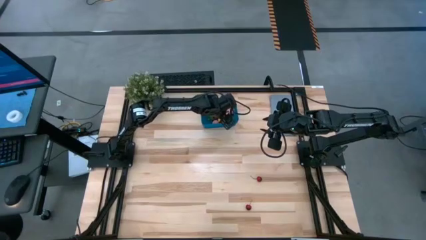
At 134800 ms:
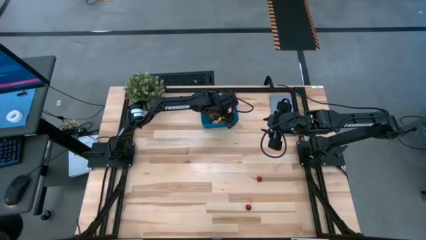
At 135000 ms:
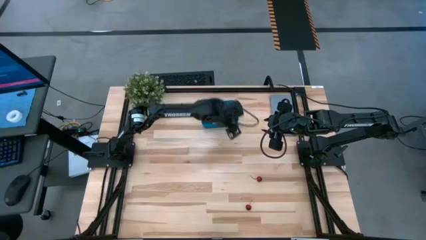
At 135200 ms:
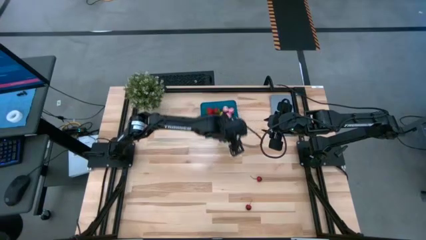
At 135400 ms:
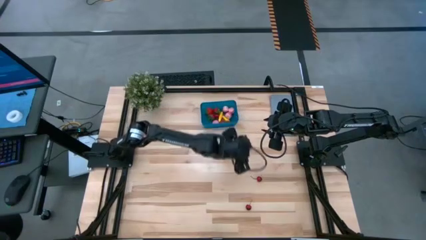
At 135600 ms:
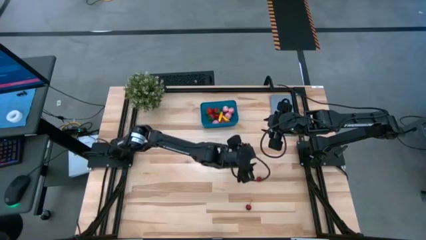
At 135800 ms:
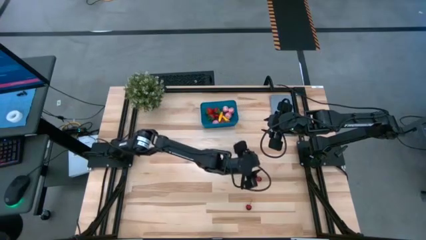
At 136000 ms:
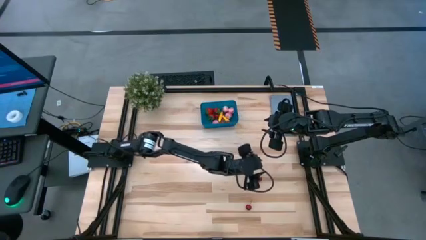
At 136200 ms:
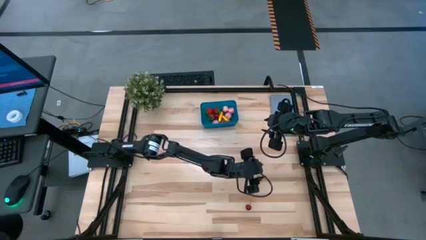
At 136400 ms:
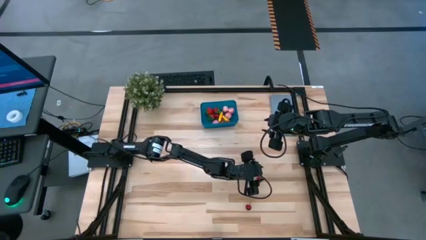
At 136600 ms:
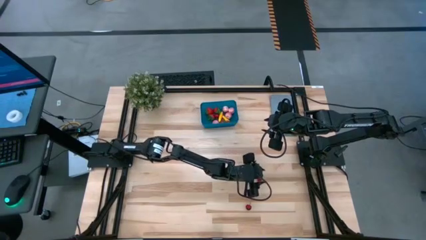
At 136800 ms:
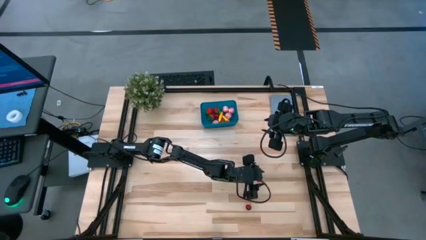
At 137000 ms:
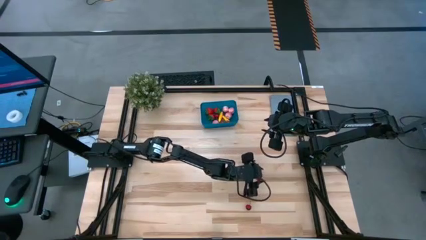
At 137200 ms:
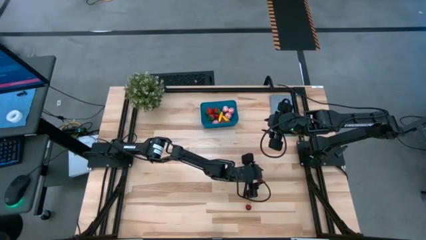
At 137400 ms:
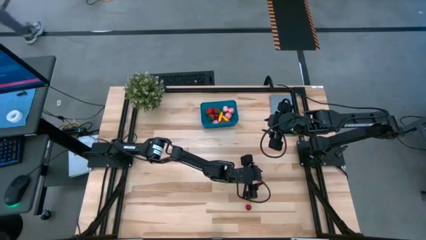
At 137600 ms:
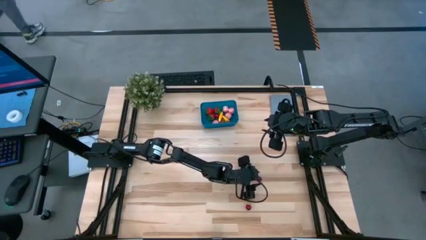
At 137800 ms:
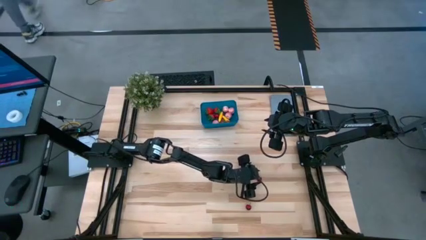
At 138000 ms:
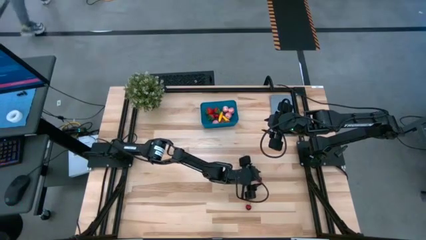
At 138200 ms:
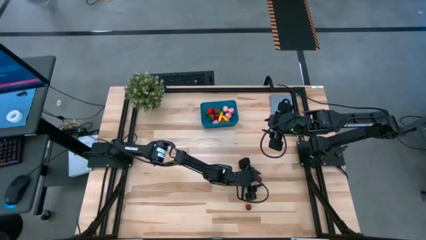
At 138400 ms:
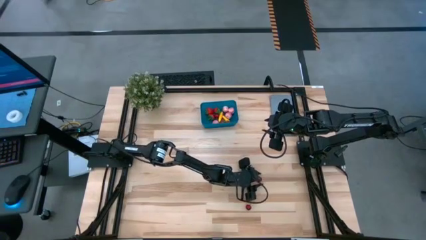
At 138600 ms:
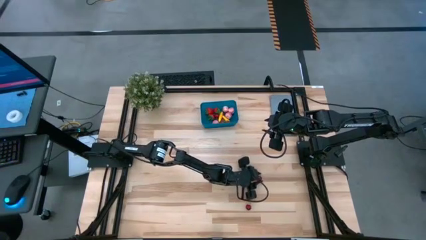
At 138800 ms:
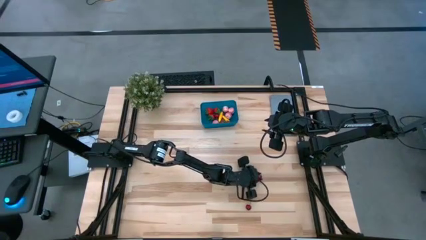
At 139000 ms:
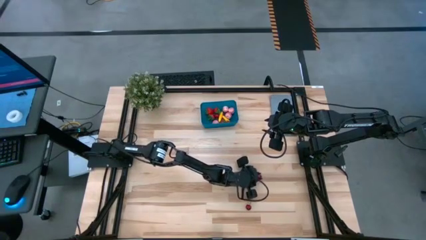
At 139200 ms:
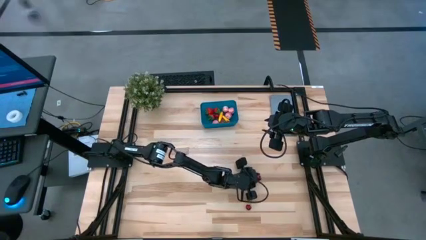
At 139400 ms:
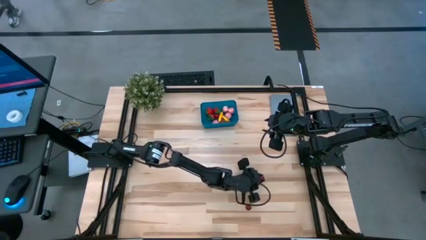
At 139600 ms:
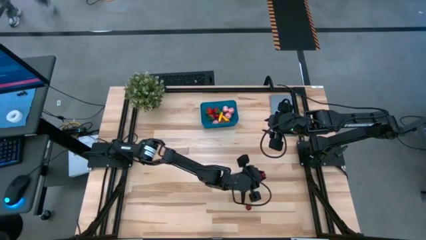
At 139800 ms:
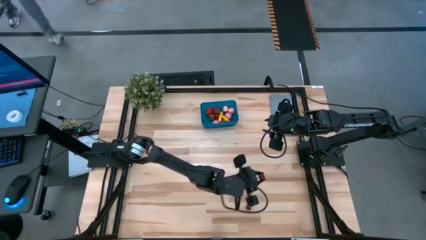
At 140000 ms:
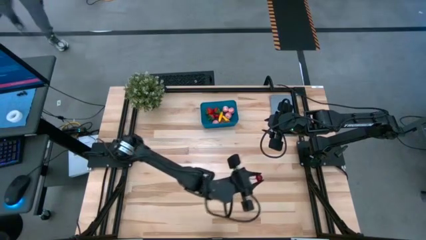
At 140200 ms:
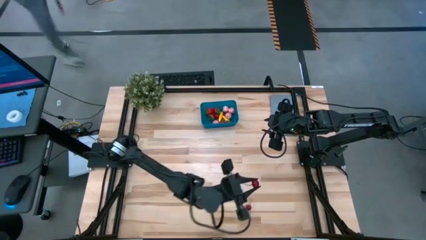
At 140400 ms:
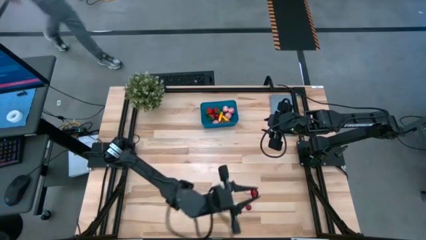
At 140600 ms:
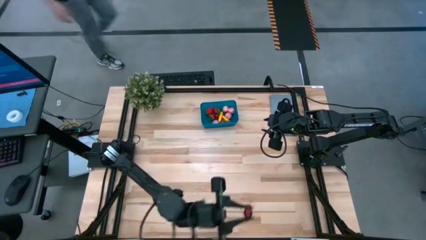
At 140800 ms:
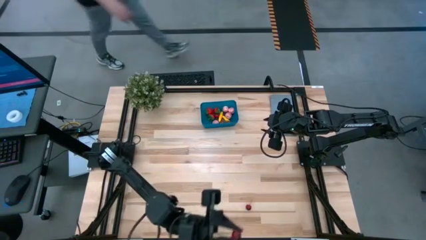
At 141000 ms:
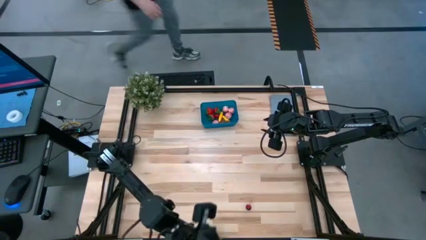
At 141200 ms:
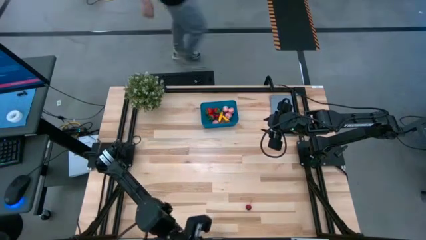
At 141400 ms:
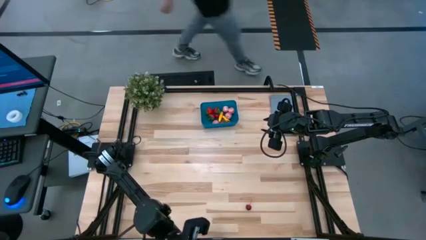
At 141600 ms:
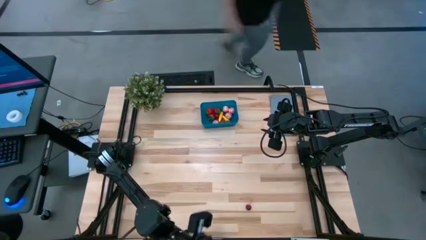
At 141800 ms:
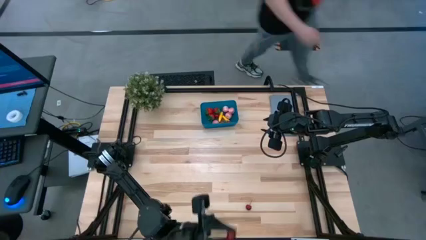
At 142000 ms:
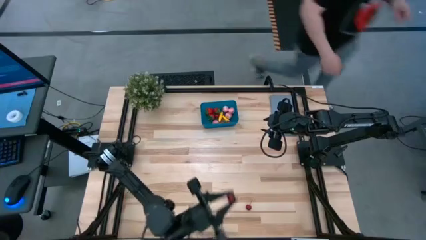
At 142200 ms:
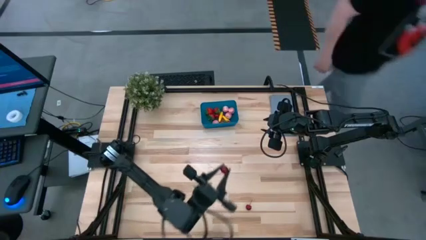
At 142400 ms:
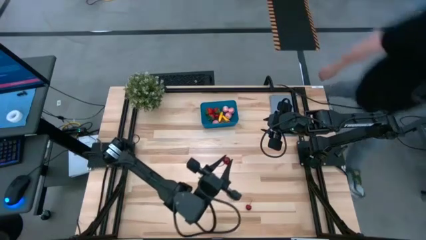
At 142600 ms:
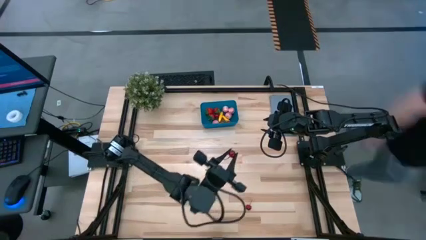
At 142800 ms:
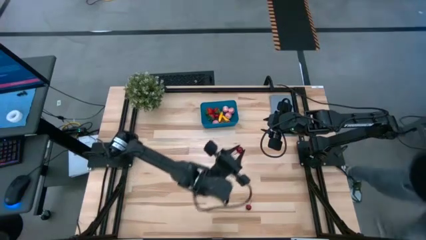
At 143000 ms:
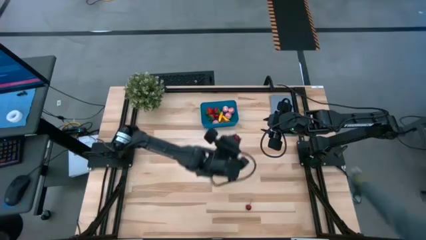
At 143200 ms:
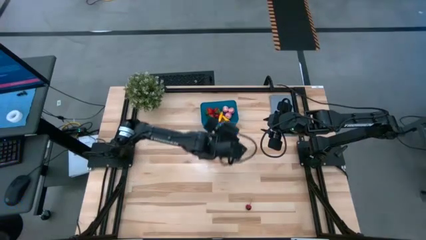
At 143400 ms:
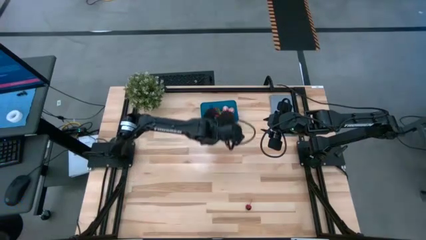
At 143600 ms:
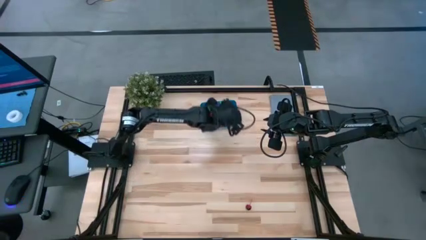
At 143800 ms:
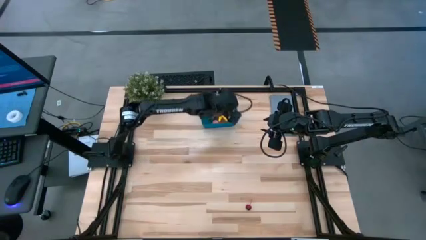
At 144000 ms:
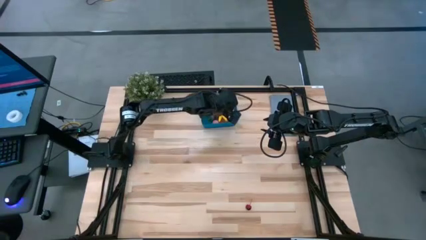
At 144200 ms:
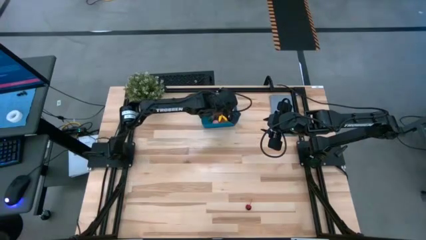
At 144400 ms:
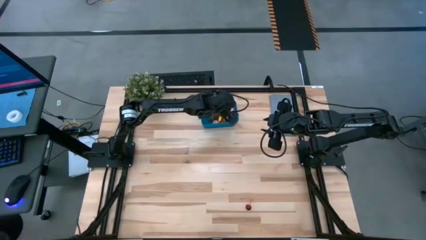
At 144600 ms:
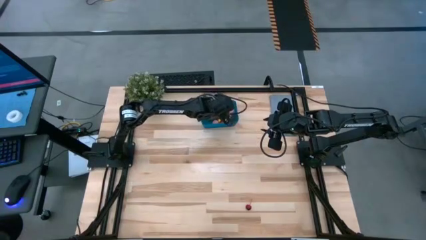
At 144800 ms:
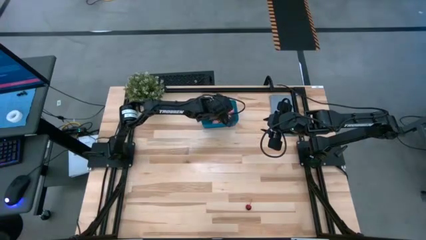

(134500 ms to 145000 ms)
Task: Pick and placing Produce into tupperware
Put the top cherry into the blue bin

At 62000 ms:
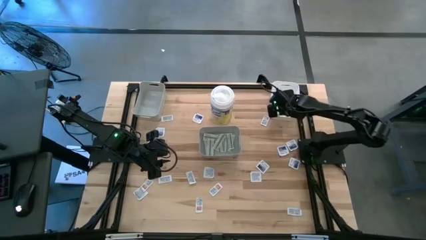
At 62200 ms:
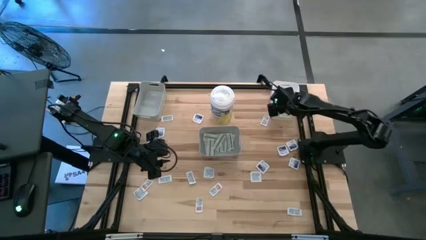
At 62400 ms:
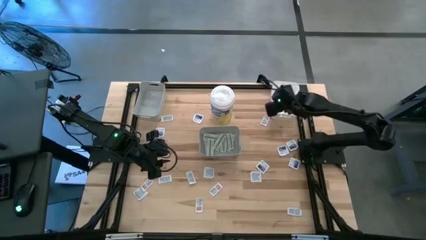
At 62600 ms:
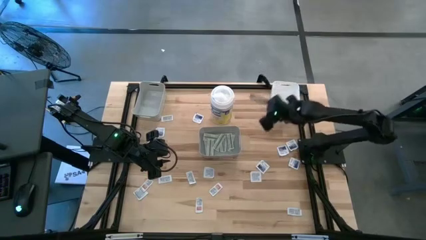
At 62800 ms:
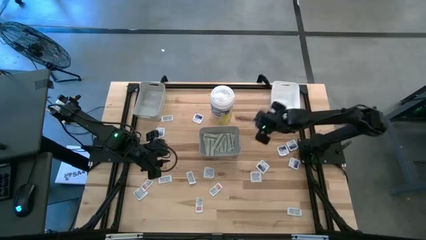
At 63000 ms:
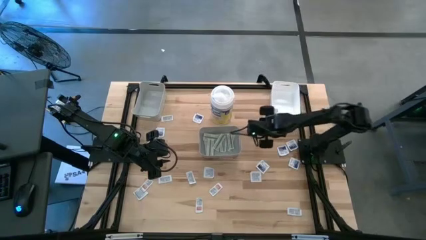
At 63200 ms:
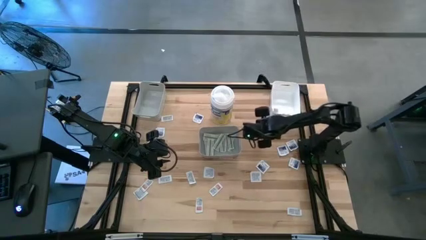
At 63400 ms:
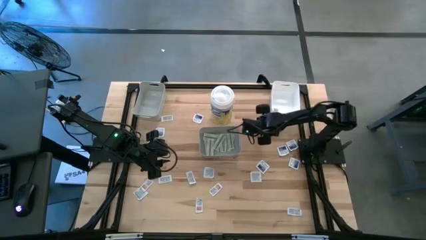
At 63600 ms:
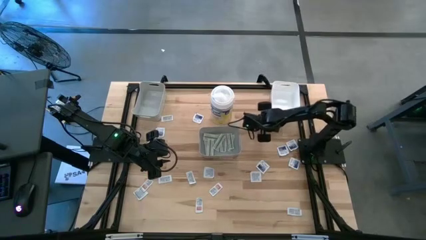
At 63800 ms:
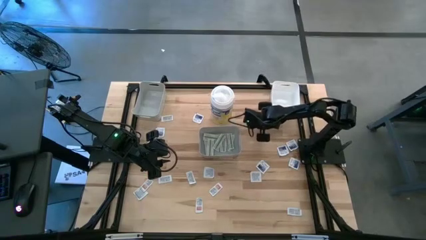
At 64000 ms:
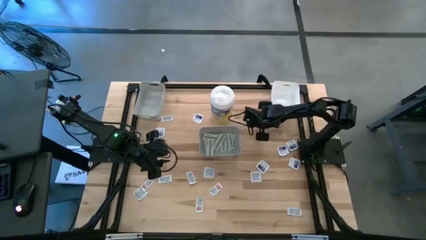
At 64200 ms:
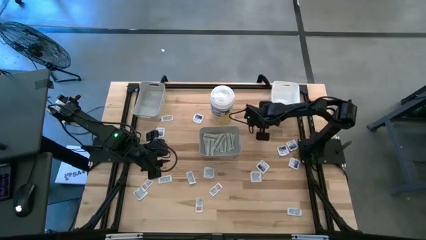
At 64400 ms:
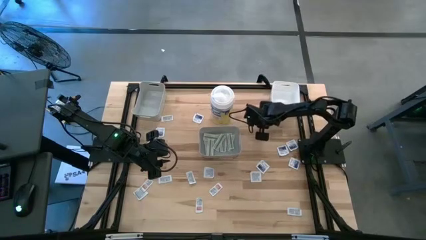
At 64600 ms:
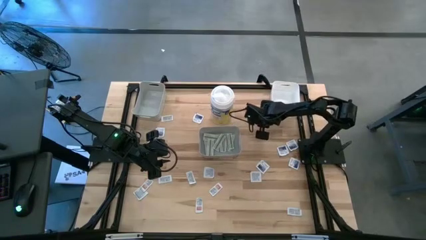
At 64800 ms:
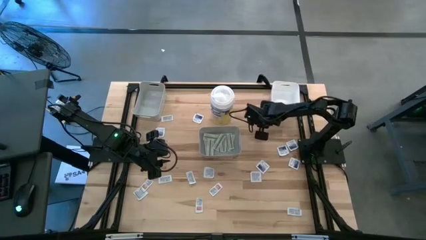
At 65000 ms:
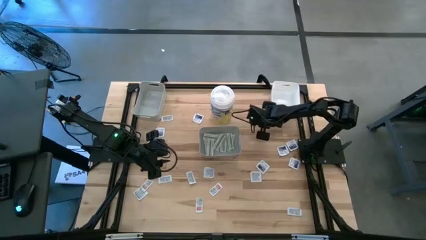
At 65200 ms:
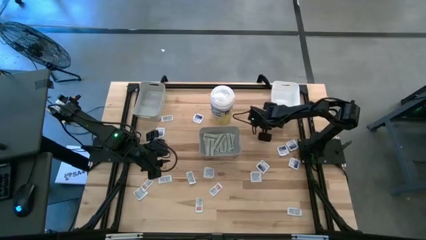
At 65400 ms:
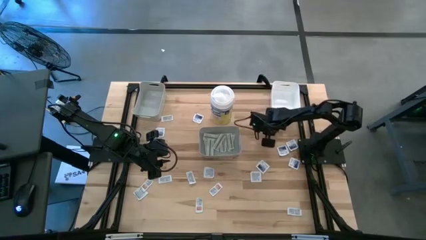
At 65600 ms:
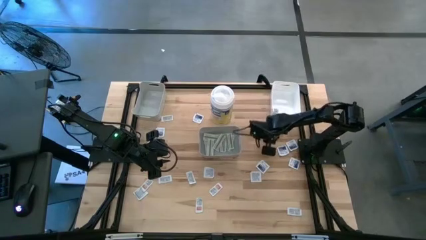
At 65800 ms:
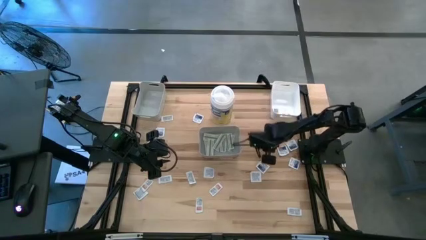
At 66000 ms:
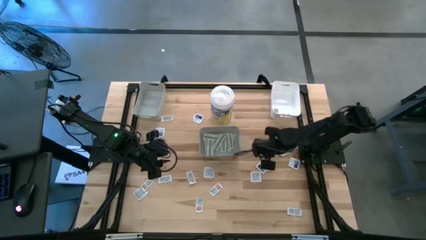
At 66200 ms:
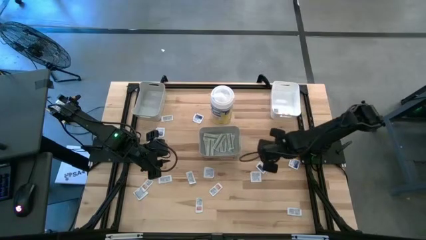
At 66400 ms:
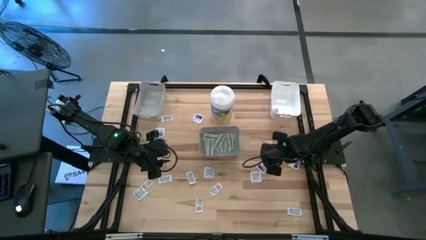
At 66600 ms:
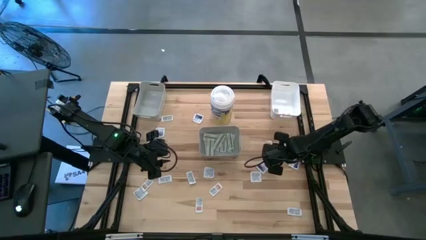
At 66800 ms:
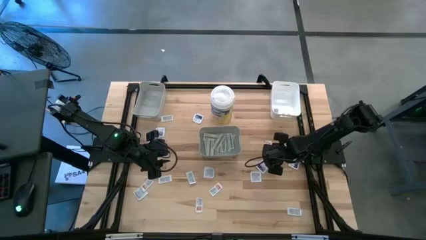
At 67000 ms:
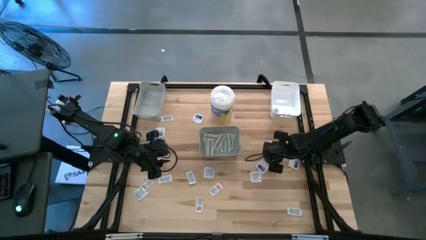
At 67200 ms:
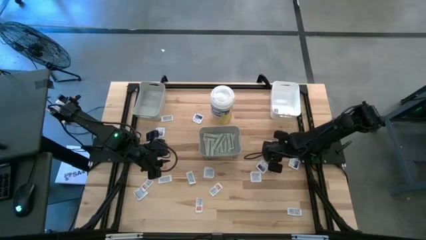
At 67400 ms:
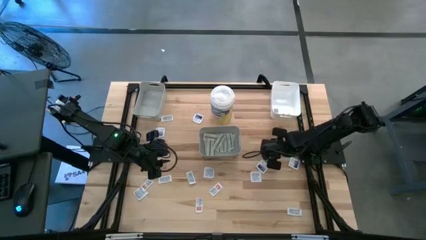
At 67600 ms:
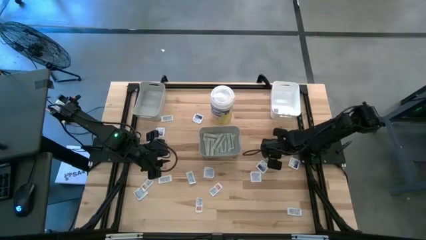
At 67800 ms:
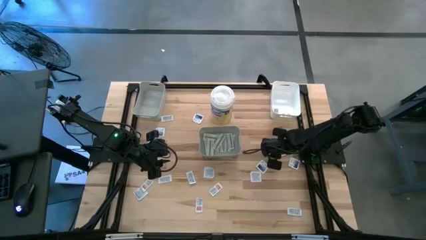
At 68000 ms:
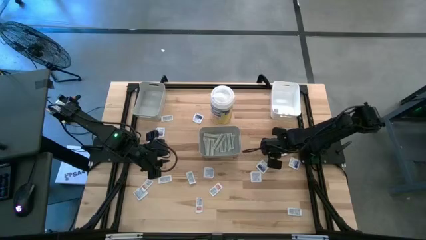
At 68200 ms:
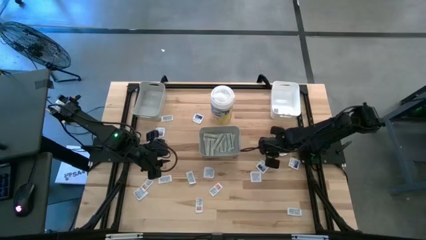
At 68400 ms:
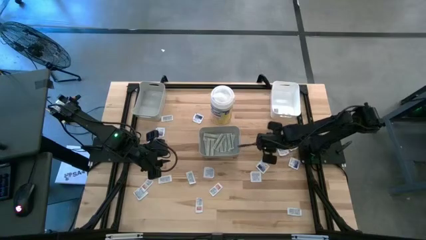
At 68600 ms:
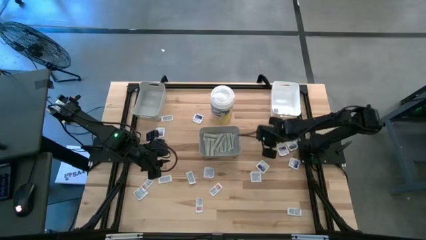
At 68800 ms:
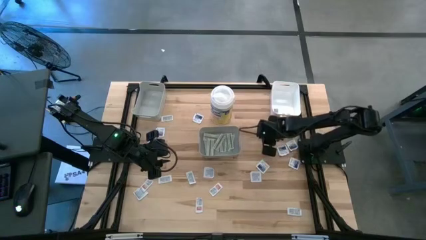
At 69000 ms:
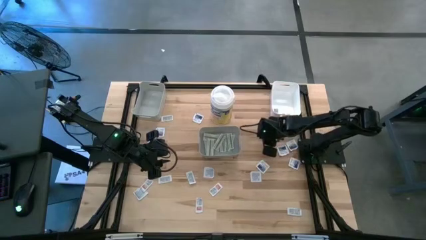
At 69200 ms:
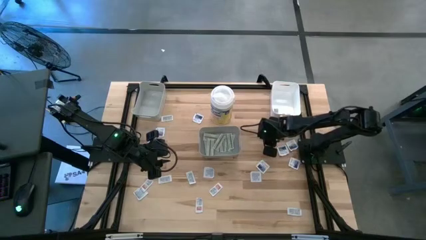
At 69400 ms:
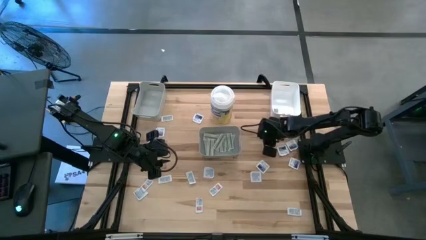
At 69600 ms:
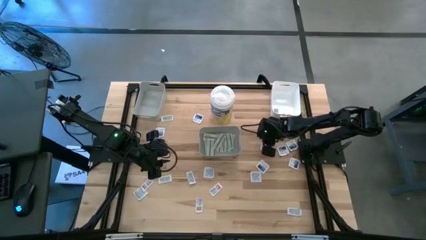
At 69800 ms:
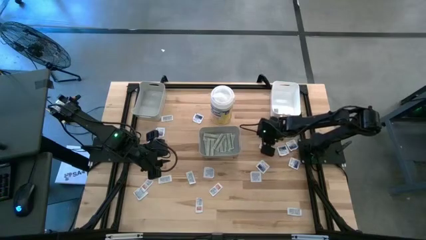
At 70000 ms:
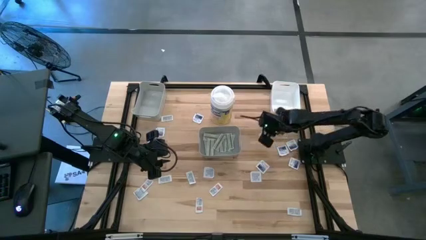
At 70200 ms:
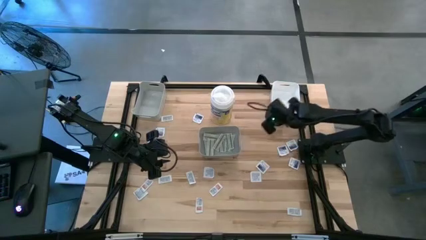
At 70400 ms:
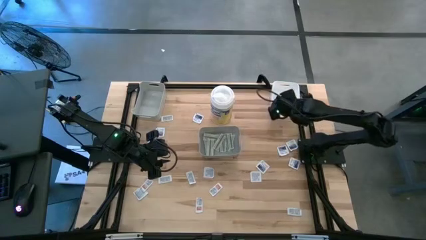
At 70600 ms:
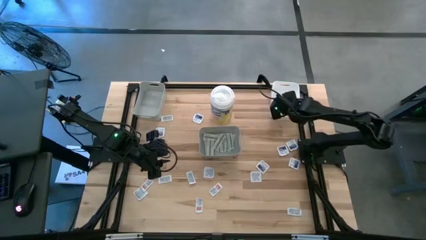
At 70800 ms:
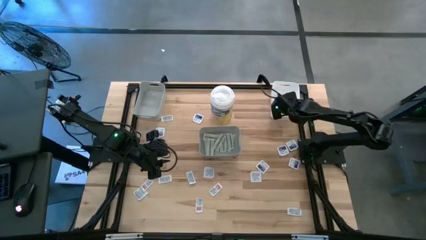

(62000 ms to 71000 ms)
Task: Pick & Place First Aid Supplies
Put the ointment pad into the white bin
